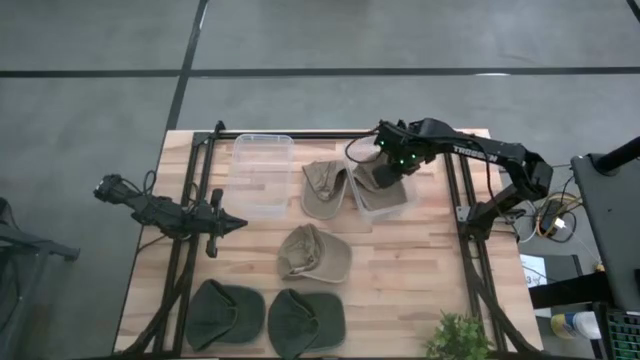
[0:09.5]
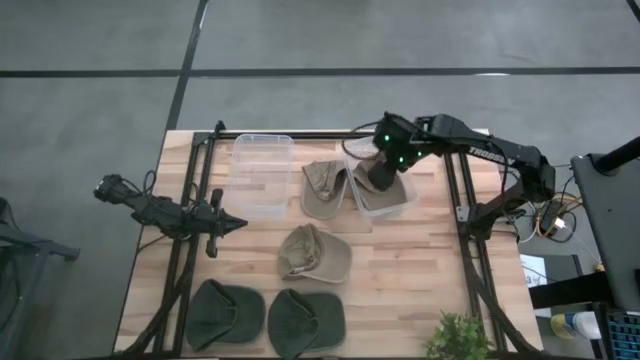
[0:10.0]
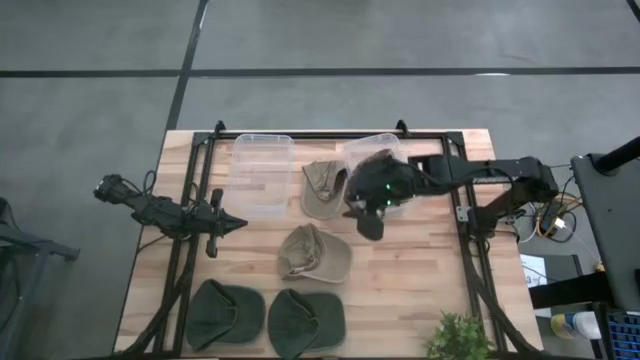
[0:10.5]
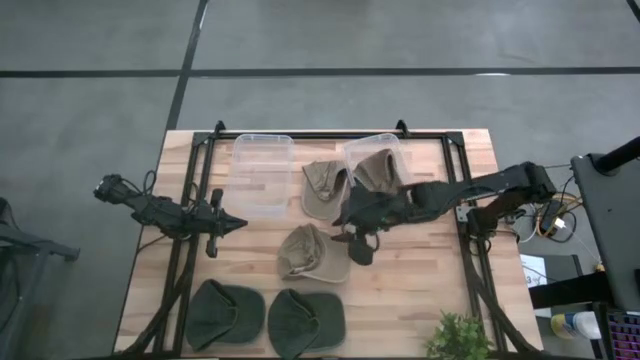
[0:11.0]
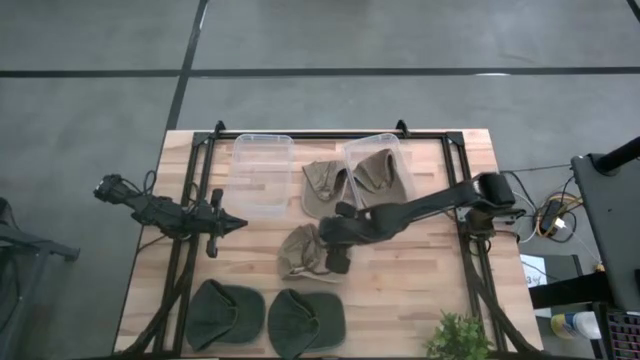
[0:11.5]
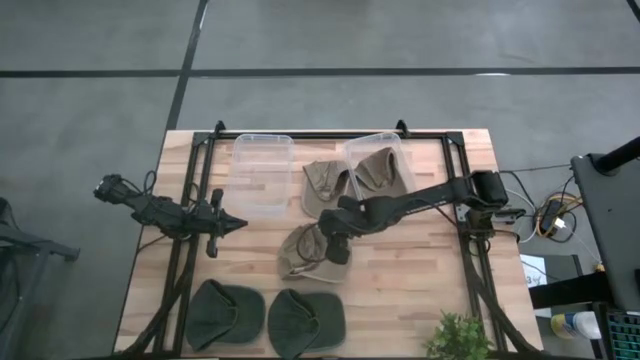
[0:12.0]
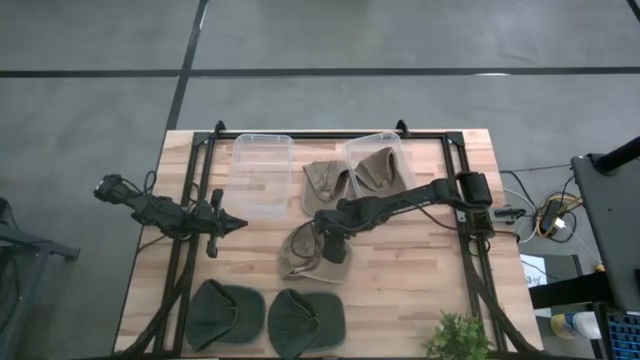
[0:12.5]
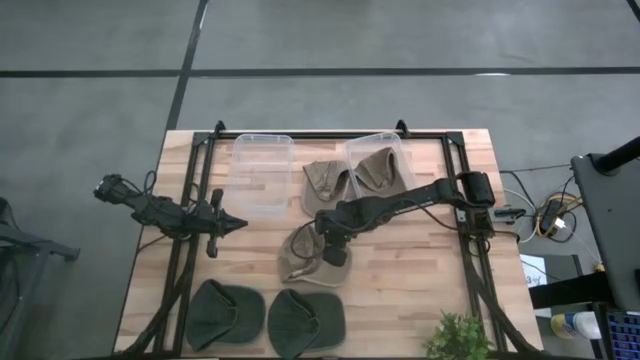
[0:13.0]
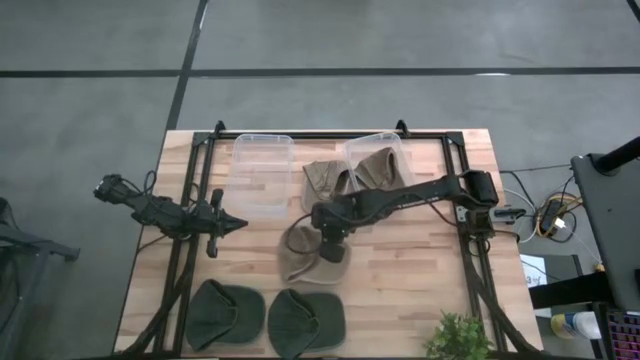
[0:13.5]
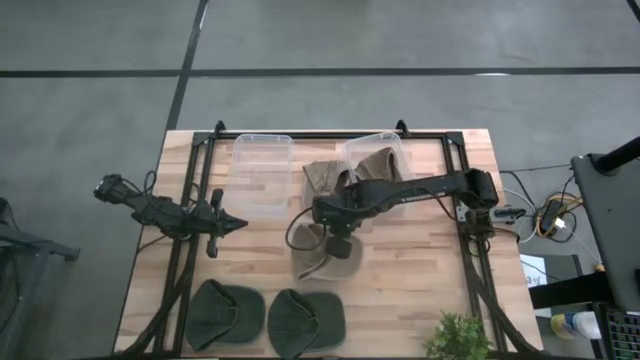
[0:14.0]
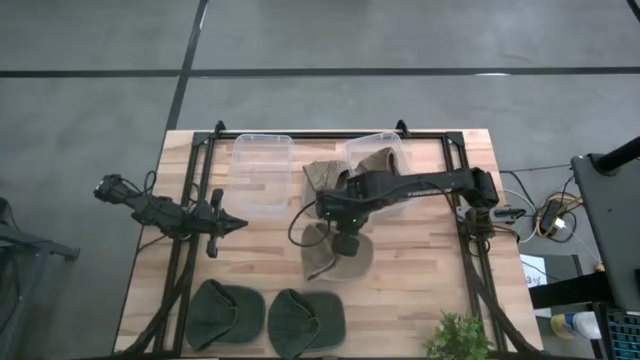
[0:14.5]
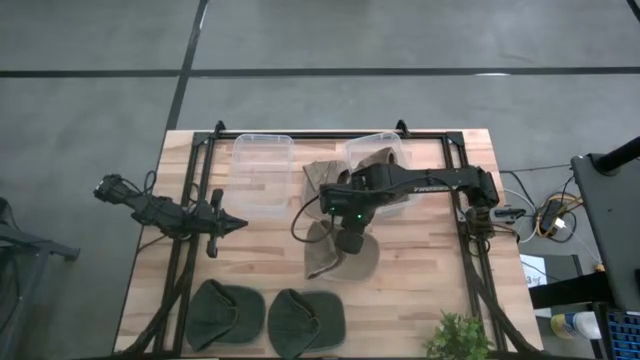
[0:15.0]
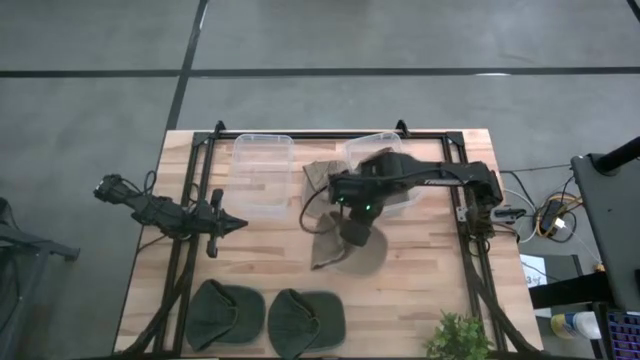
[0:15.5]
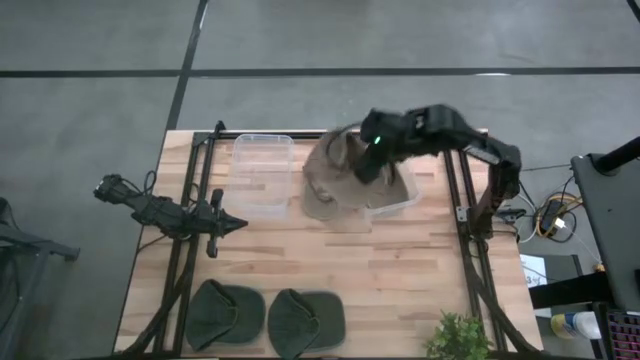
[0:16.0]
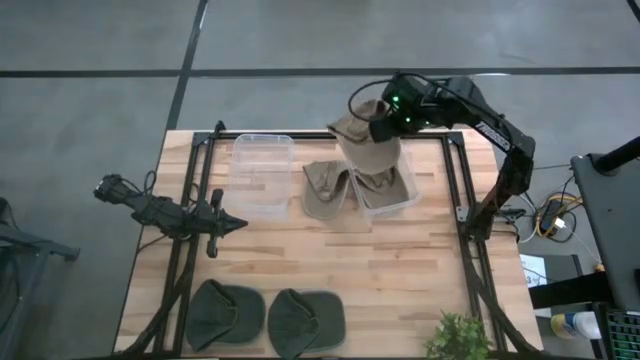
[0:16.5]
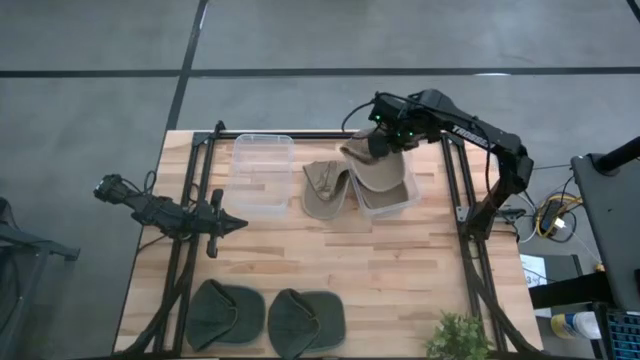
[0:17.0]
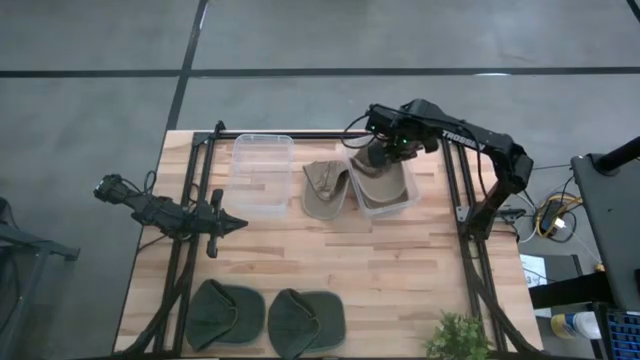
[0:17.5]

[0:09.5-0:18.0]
Task: Pick & Place hat
Put the bottom brown cap into the right transparent bin

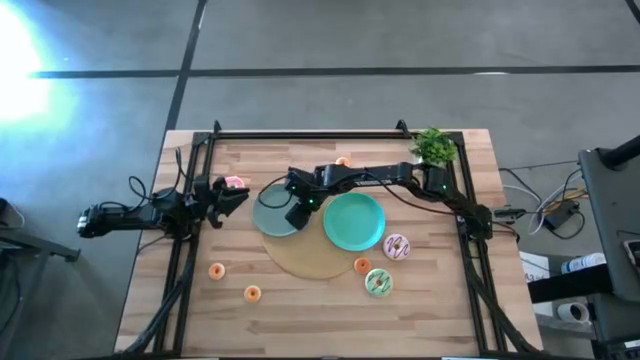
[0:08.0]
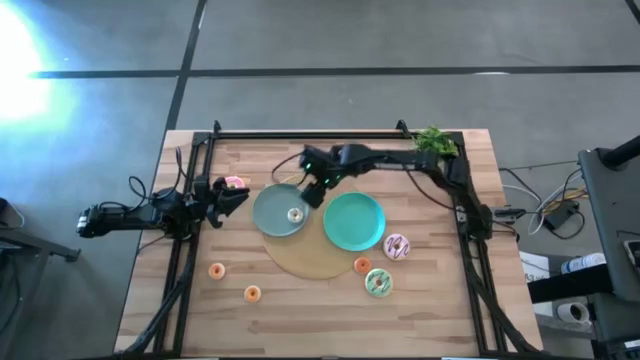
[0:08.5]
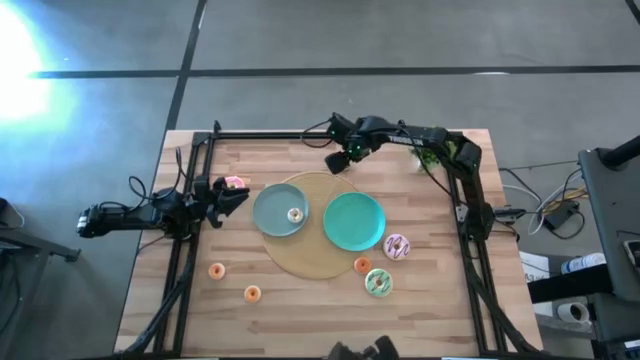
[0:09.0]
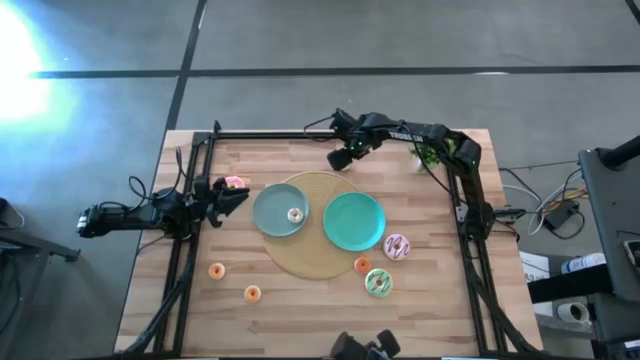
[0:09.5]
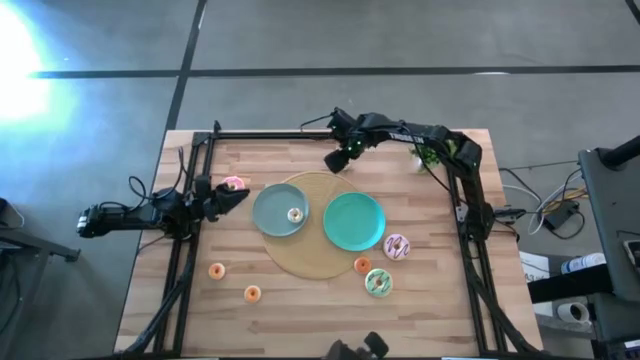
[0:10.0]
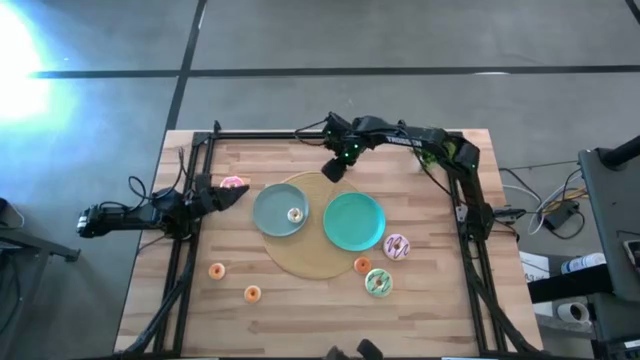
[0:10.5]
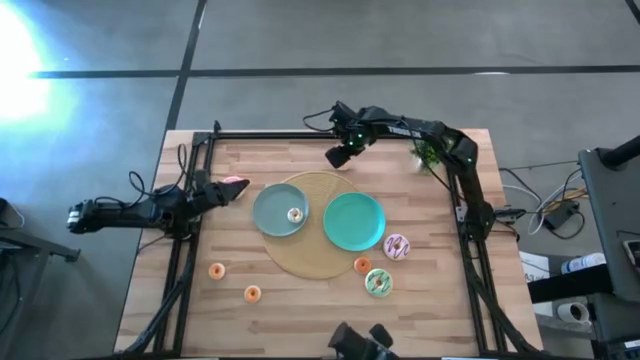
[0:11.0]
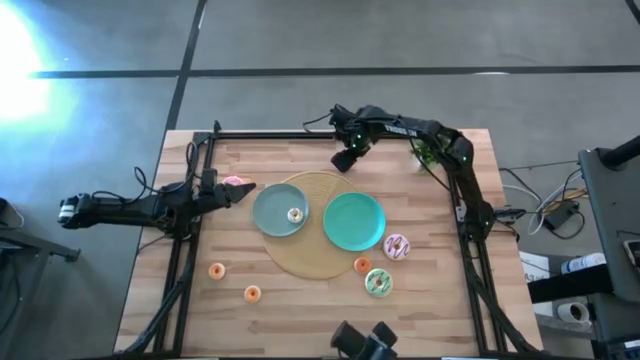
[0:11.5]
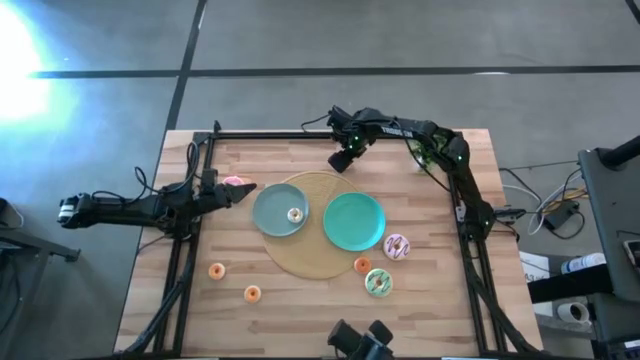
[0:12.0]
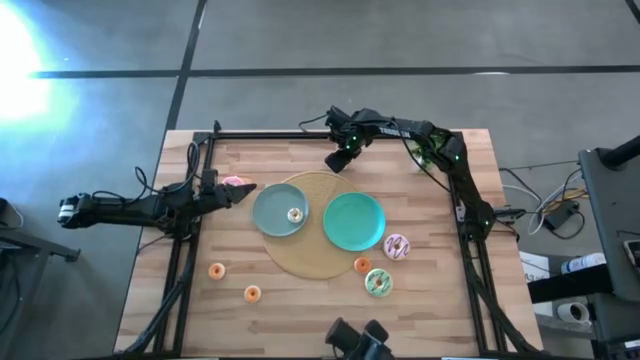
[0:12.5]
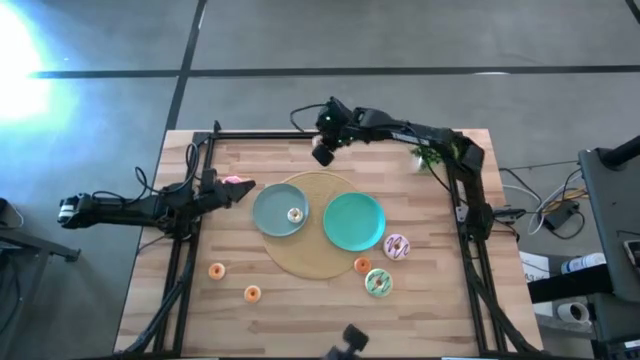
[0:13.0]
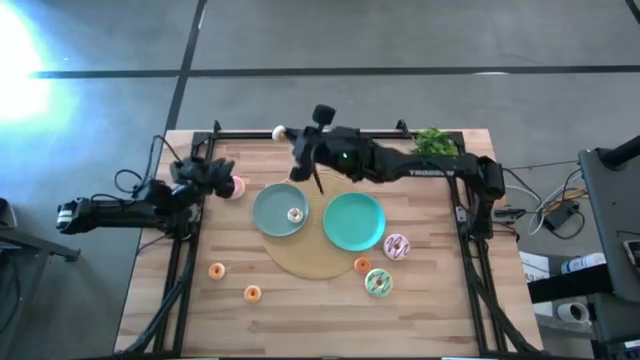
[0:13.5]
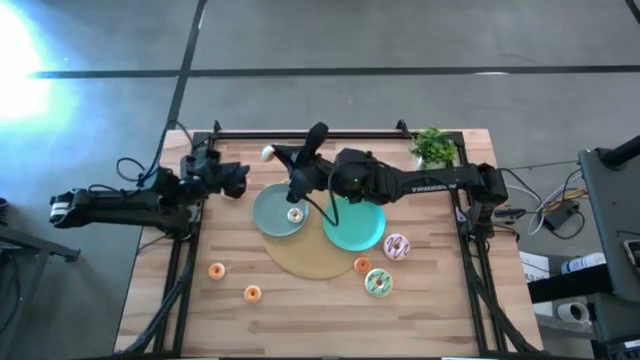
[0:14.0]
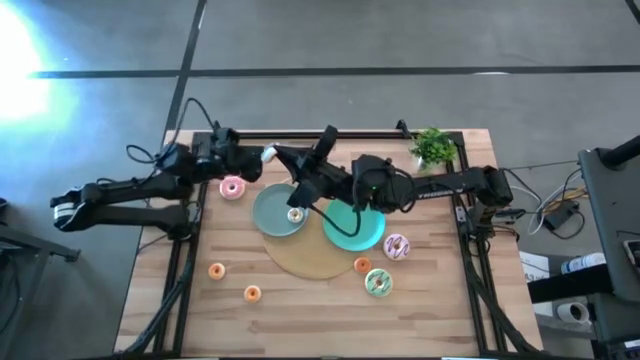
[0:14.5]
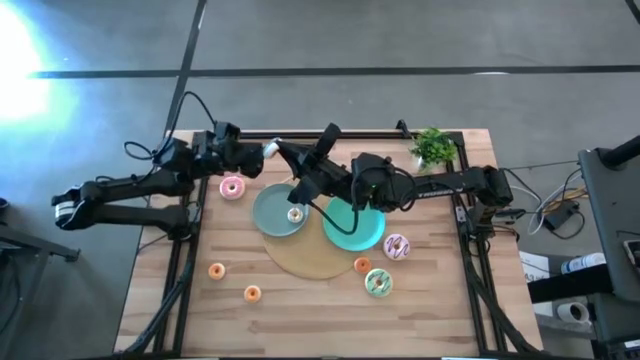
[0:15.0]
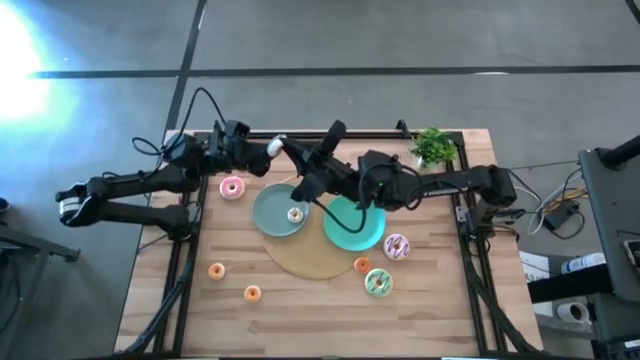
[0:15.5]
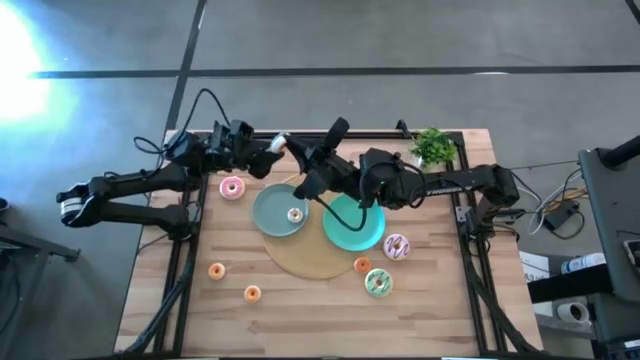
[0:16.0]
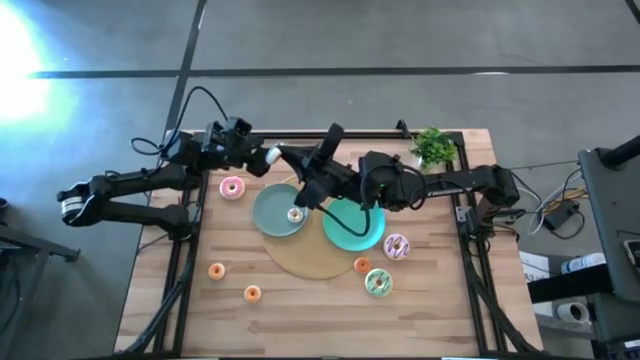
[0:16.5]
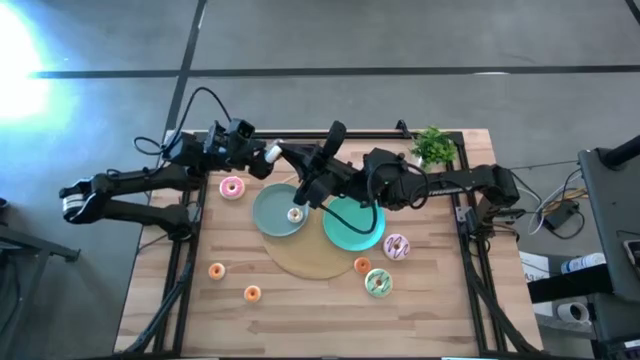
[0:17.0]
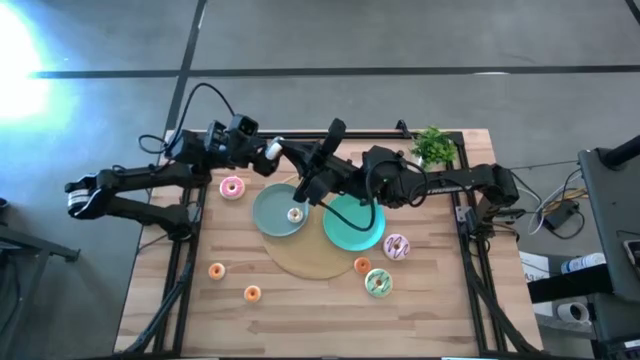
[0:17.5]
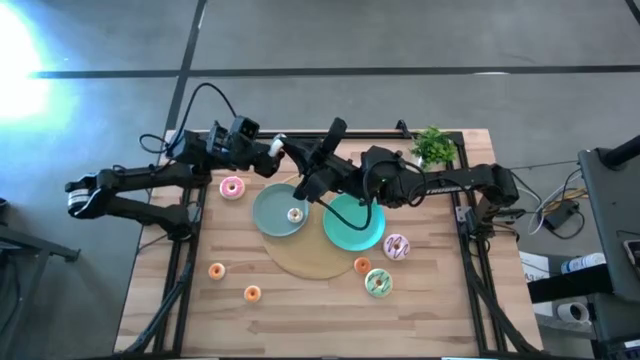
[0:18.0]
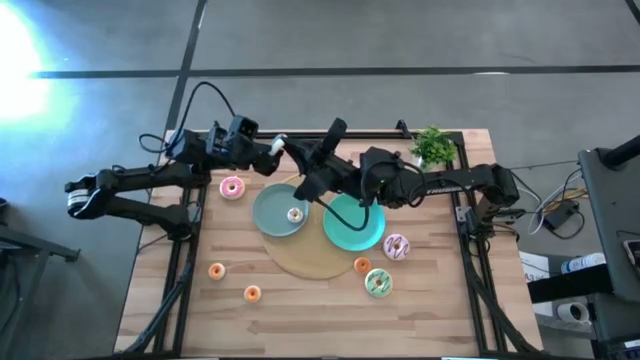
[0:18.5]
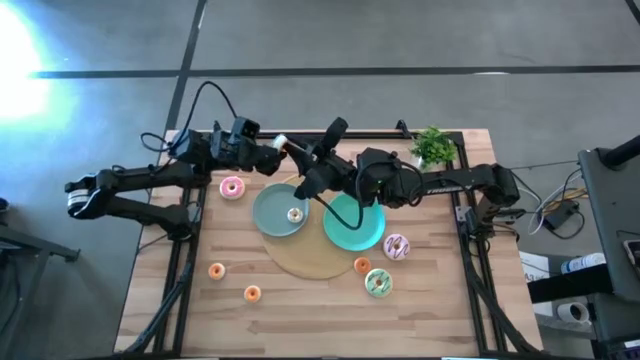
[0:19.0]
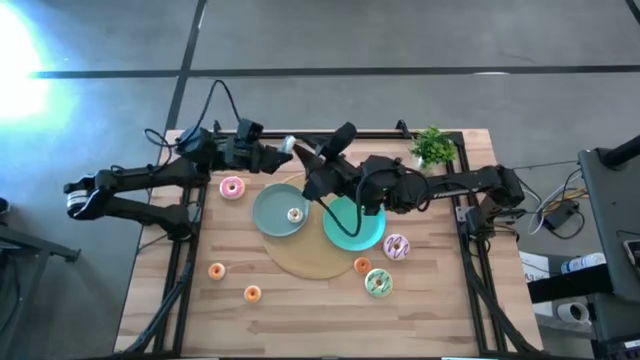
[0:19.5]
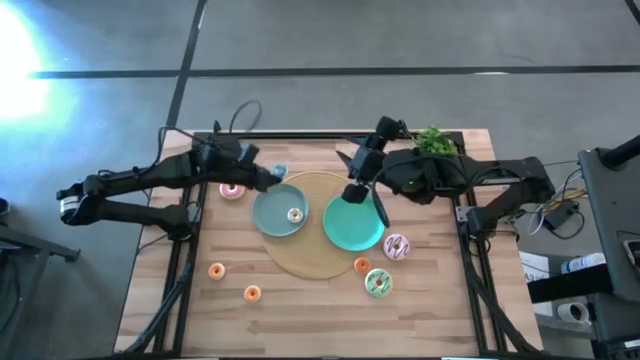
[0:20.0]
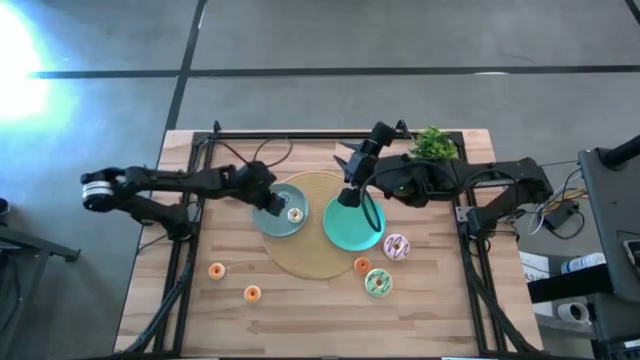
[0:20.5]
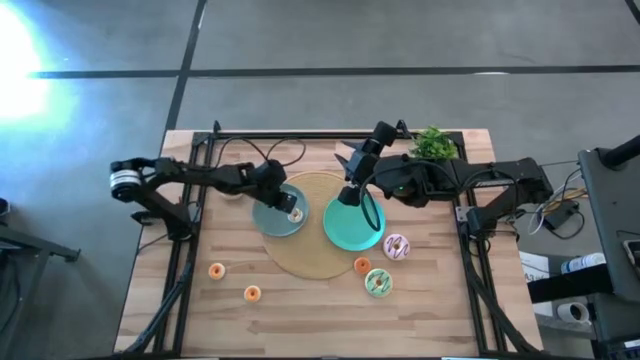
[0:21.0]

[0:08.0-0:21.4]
Task: Pick & Place donuts
Put the small blue donut on the light blue plate
